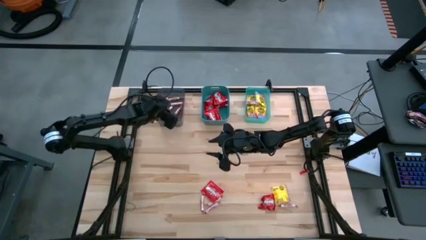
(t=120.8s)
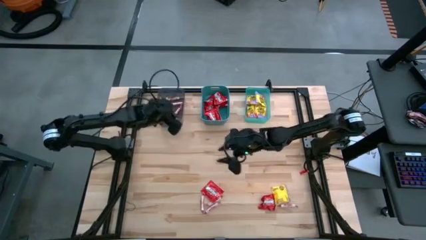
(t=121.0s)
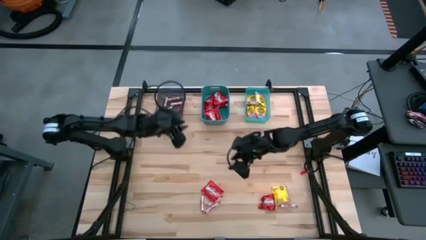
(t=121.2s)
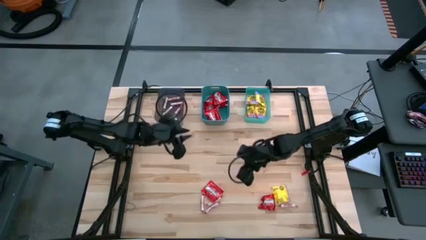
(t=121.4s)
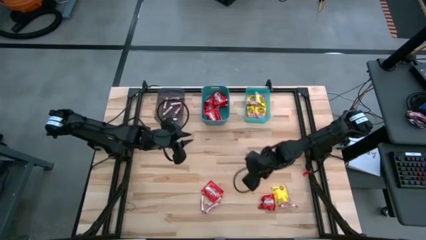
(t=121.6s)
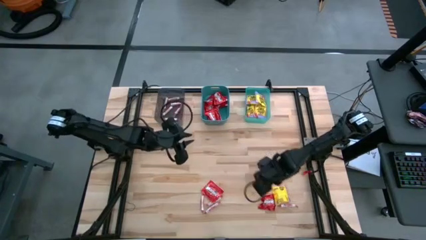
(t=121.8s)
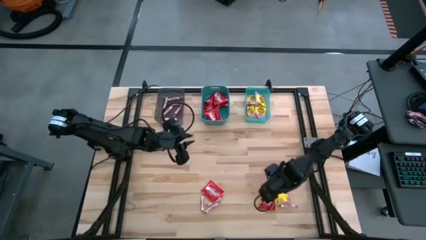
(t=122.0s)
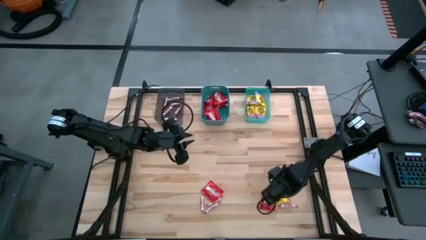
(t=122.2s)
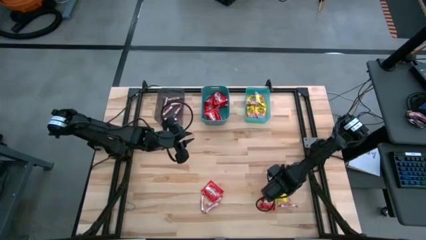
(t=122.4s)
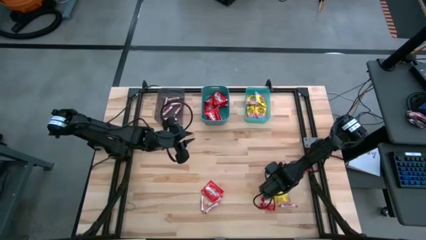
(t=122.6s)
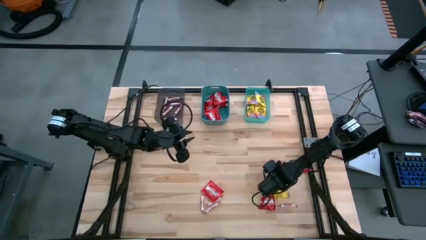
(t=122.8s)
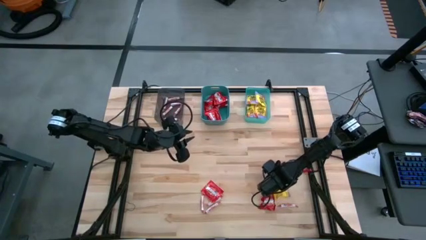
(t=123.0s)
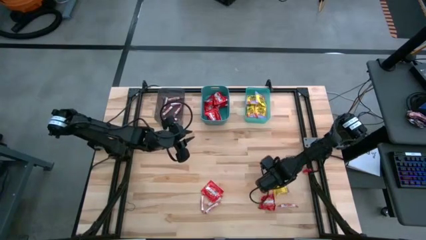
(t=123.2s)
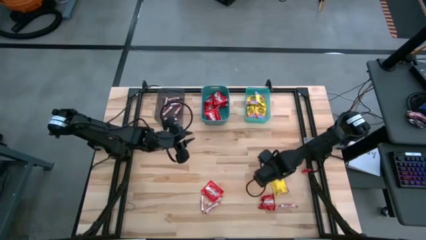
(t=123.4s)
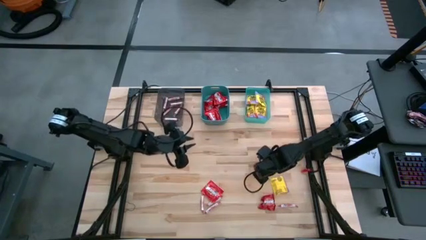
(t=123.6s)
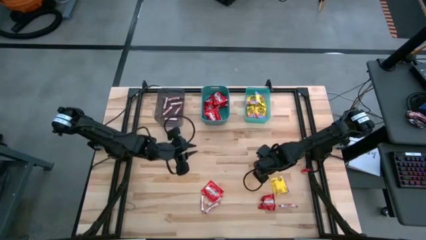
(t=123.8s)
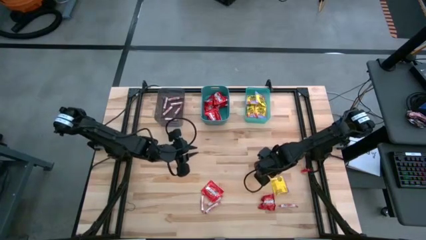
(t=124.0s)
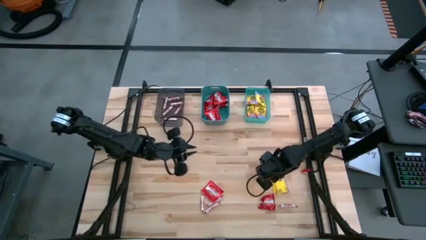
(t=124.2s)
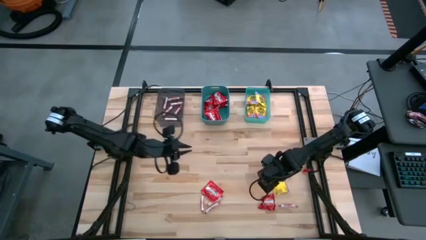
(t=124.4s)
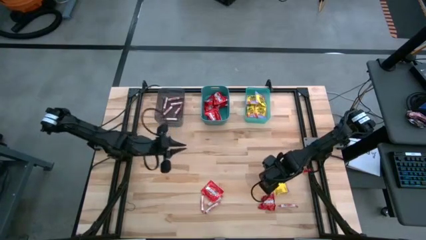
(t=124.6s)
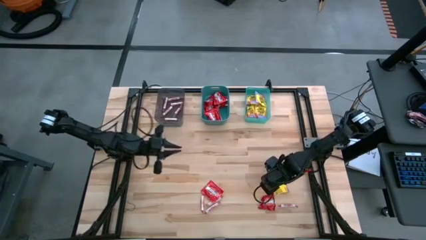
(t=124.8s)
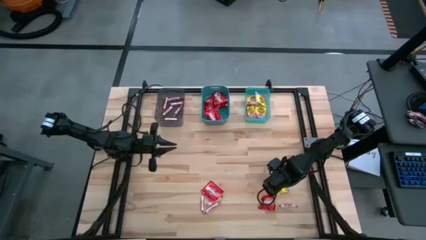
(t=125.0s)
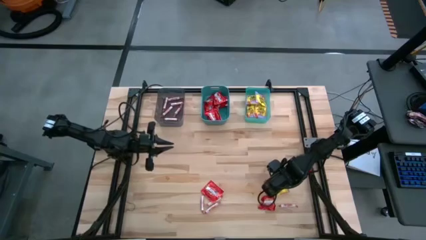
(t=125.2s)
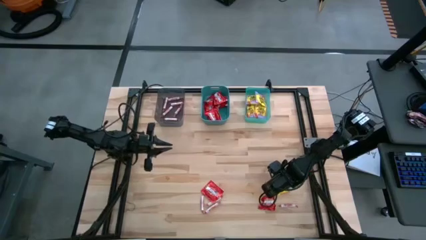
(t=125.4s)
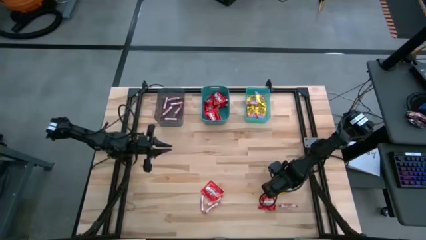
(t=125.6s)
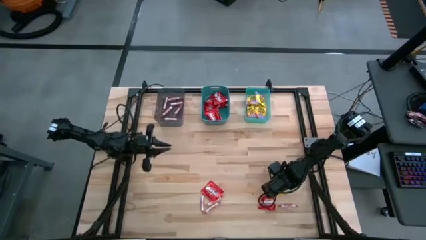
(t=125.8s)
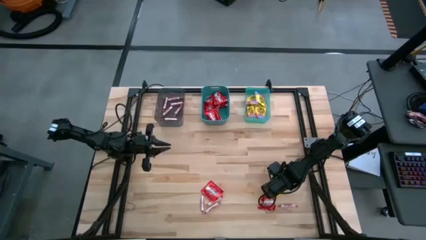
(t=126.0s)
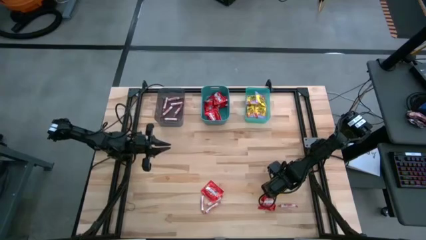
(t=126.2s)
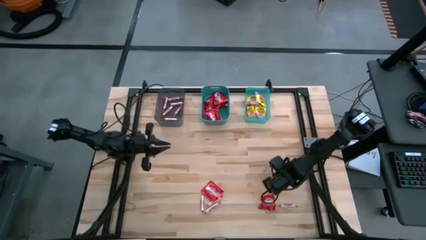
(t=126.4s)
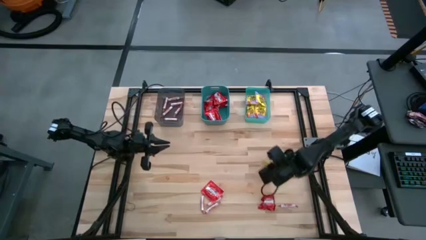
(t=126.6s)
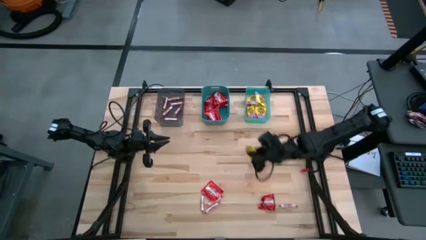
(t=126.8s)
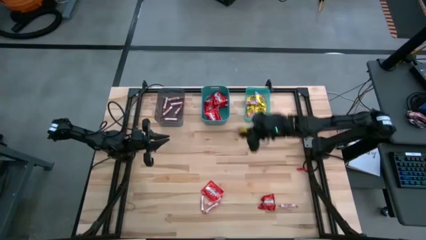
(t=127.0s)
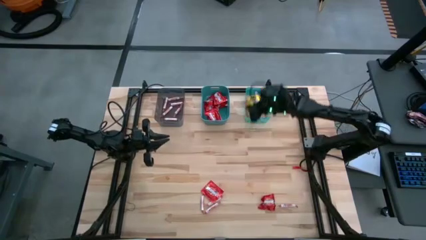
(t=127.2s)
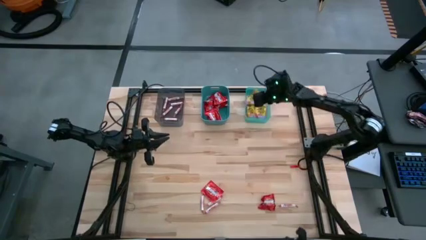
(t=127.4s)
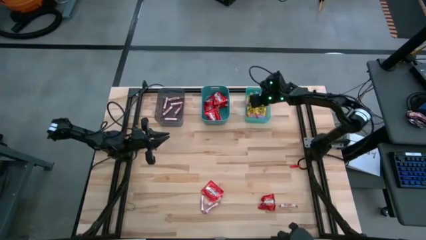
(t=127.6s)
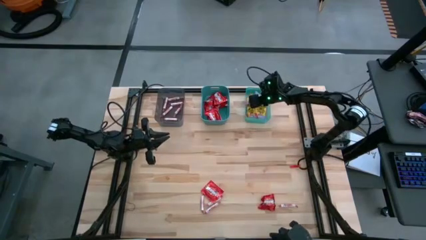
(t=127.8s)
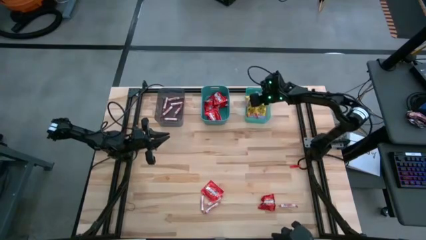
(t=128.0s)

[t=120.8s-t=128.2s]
Task: Sort candy
Put the yellow candy on the light green bin

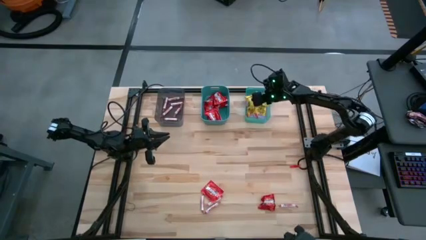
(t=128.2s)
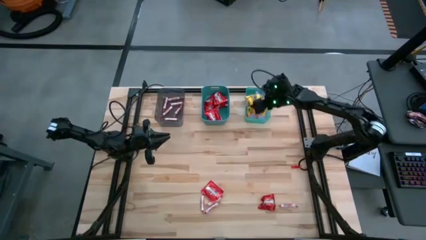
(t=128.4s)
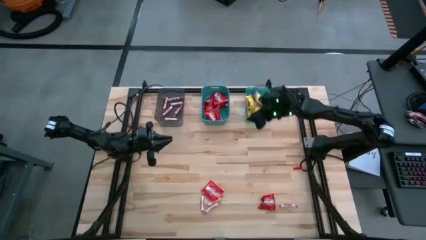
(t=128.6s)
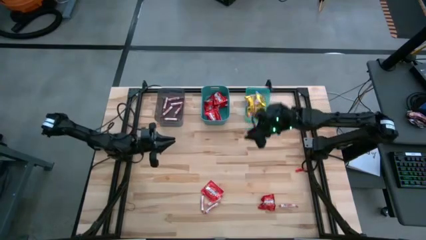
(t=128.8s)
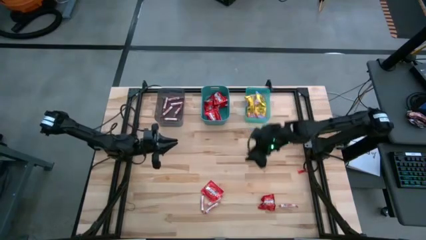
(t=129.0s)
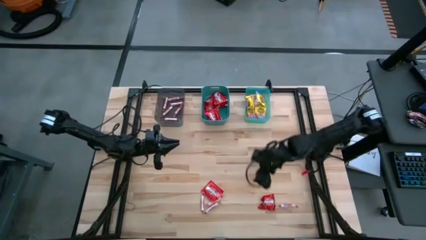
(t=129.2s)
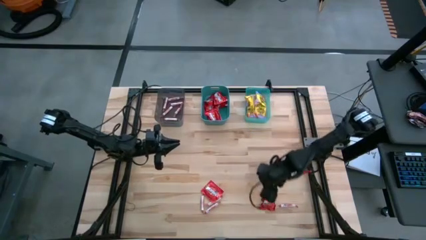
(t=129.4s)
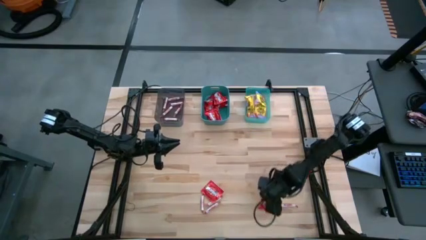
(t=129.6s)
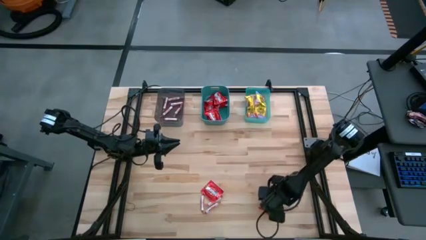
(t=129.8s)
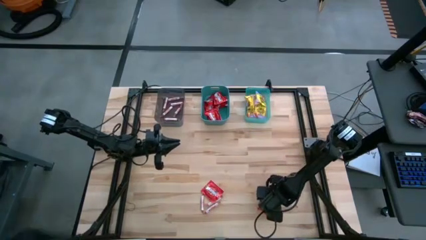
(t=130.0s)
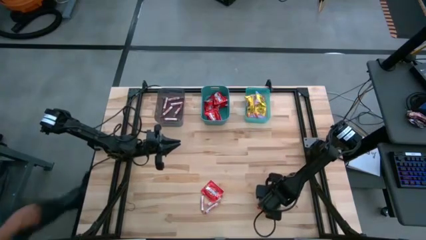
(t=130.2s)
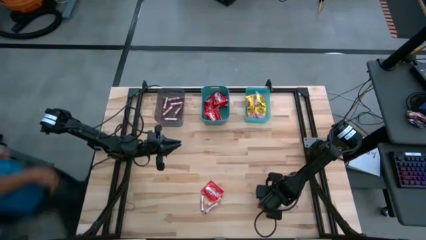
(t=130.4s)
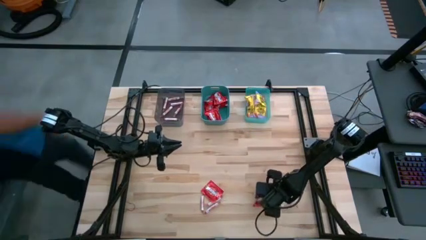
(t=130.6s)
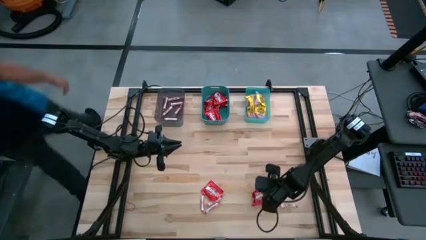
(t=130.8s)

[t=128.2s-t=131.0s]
Put the right red candy on the dark green bin

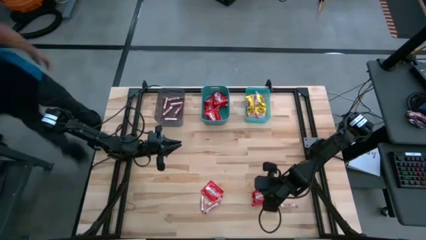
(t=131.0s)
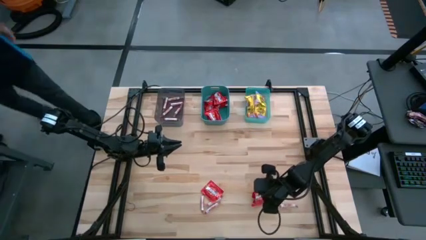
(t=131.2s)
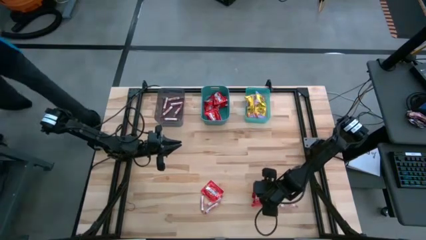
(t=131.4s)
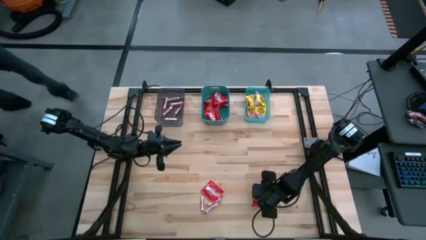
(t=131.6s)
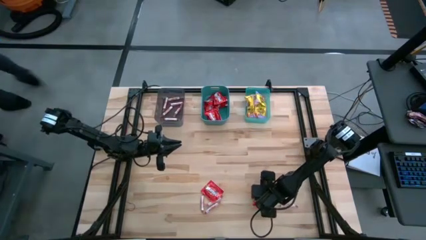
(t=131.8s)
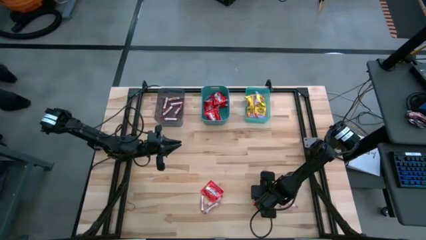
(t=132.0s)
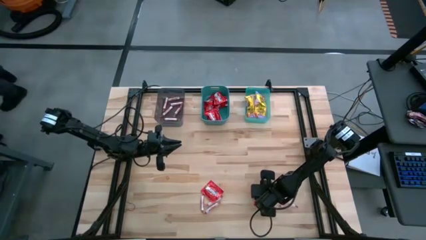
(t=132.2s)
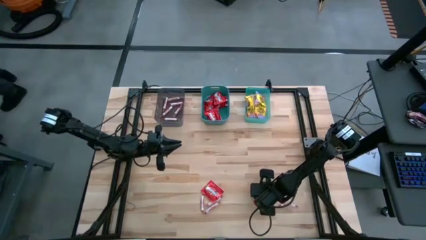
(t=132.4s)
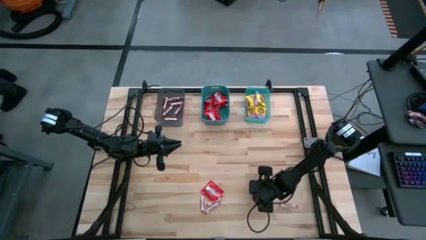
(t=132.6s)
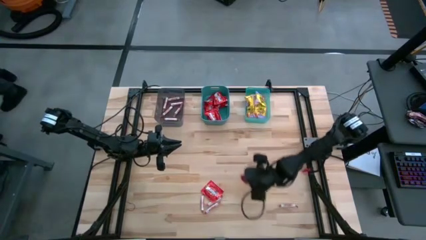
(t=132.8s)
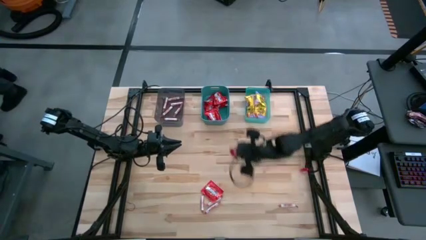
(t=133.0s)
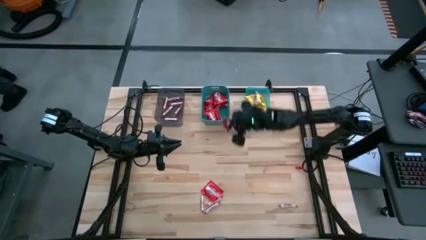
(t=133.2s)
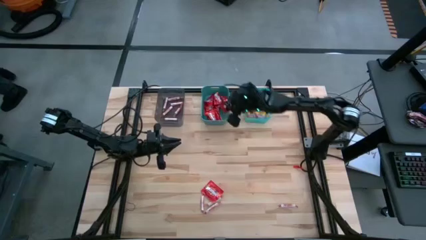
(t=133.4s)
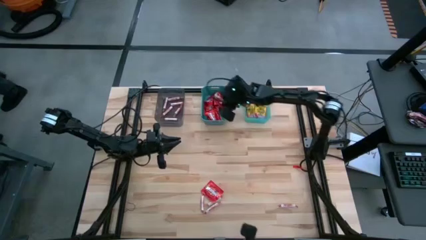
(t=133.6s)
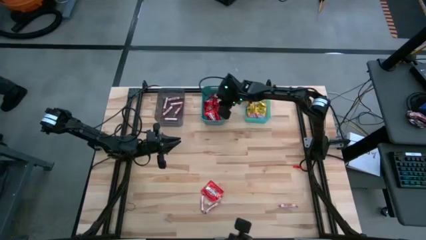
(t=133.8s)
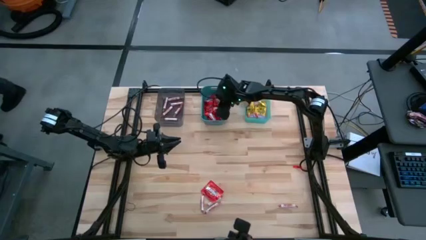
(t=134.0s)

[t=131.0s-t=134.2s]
Put the right red candy on the dark green bin

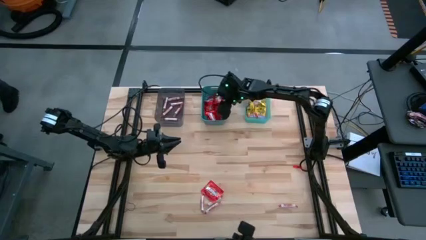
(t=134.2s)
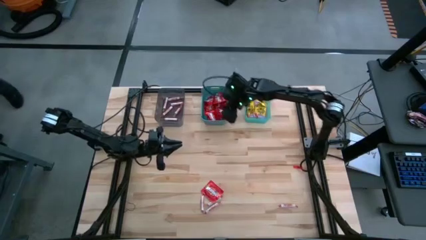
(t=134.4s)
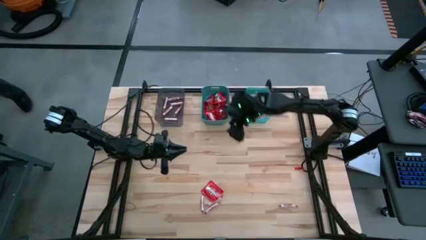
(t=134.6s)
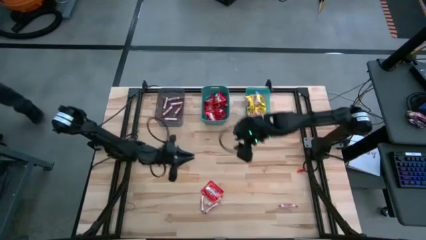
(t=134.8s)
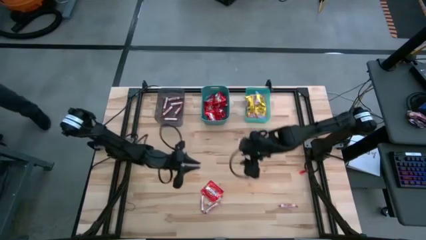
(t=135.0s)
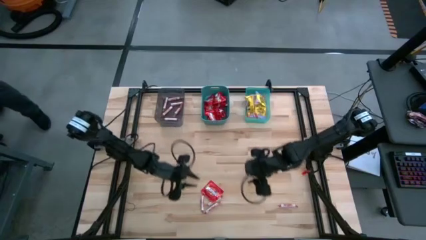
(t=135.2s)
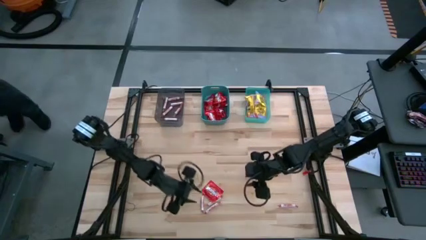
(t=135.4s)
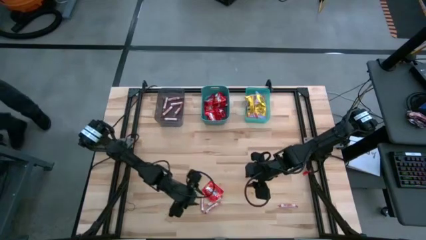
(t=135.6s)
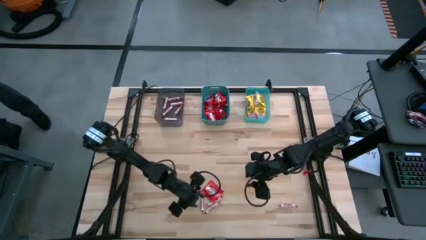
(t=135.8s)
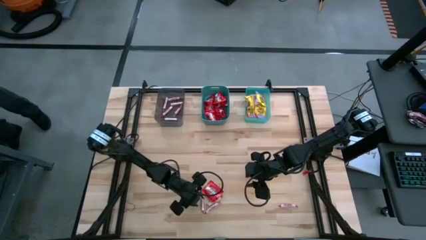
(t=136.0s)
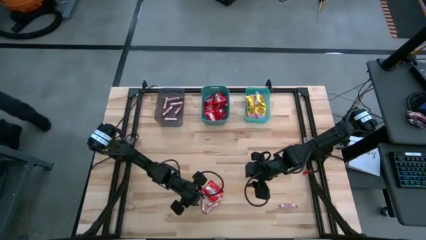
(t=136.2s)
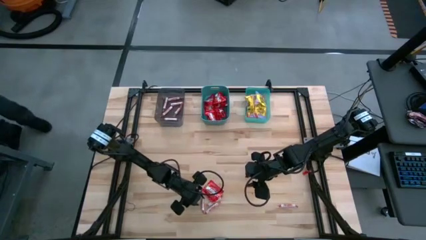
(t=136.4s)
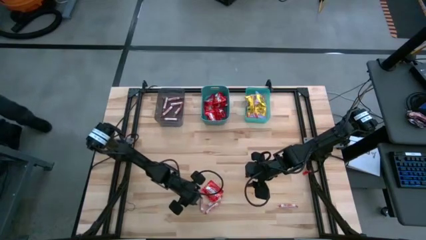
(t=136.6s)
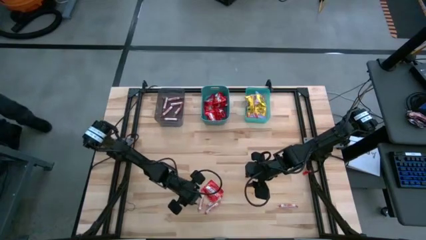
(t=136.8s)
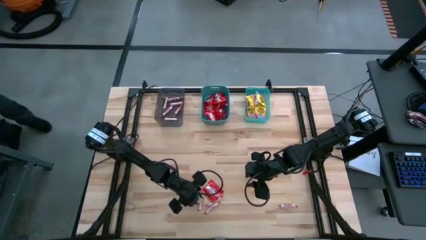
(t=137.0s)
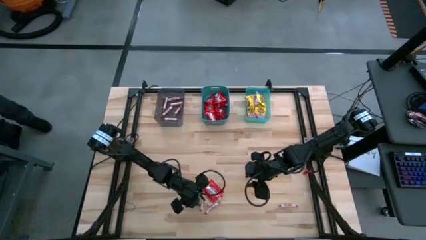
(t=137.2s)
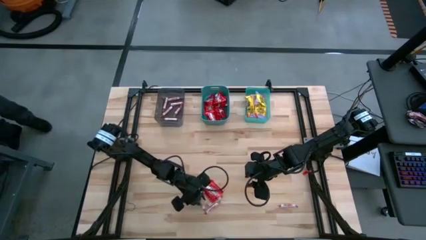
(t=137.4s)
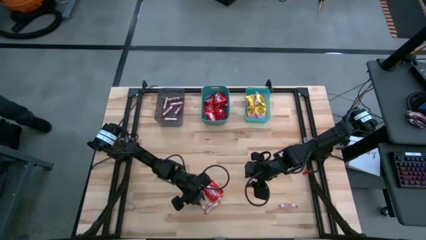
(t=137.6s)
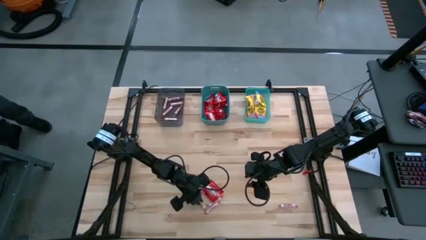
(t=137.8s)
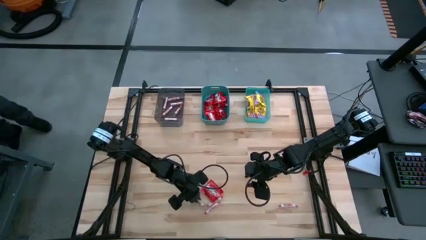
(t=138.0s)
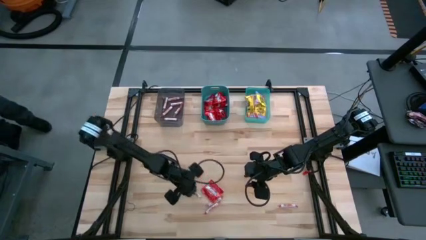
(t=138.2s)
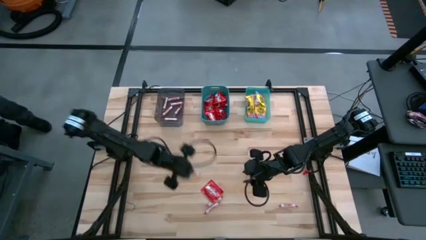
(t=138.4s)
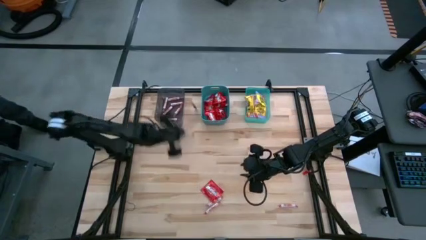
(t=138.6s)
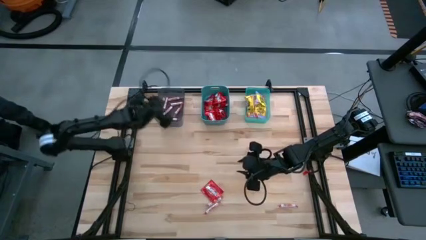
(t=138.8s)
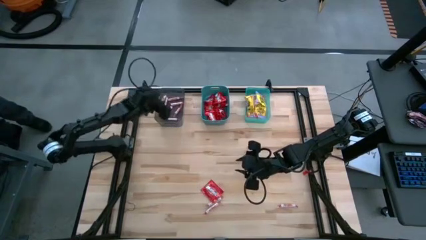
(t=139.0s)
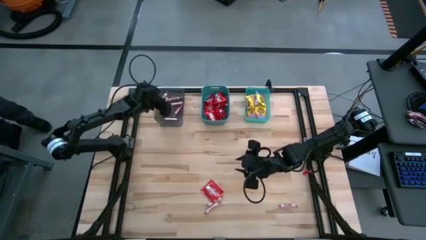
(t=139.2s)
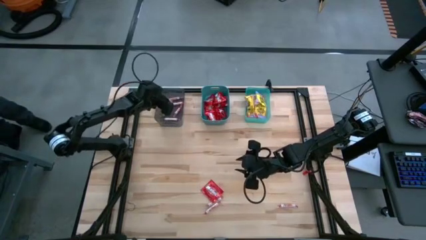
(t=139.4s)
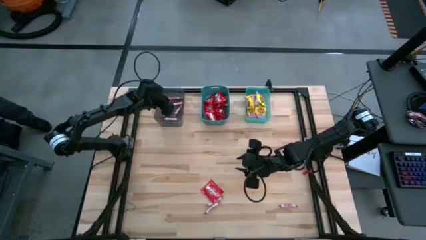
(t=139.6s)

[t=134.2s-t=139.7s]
Put the white candy on the black bin
